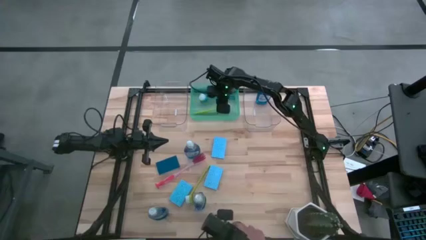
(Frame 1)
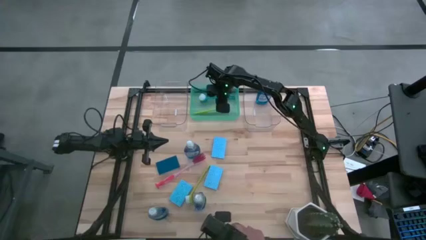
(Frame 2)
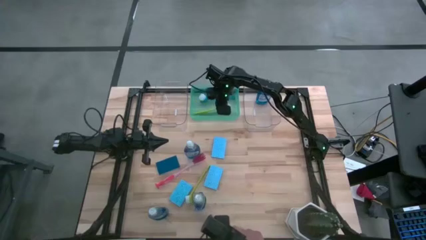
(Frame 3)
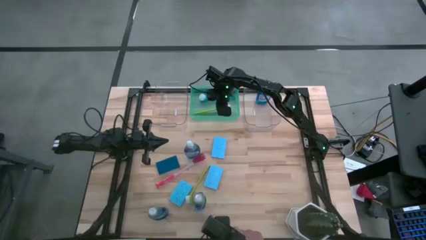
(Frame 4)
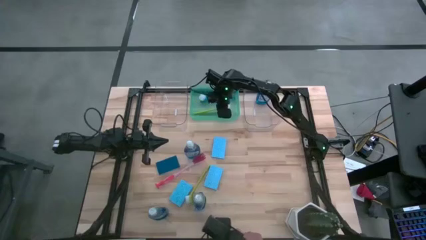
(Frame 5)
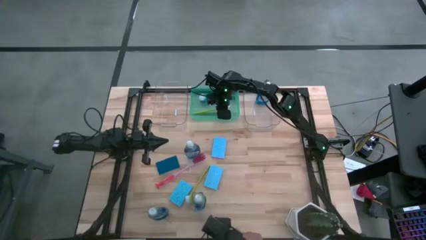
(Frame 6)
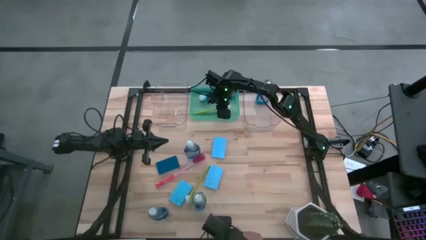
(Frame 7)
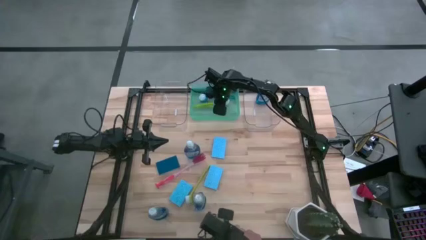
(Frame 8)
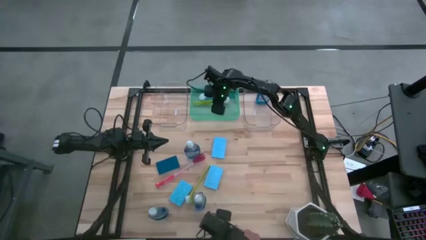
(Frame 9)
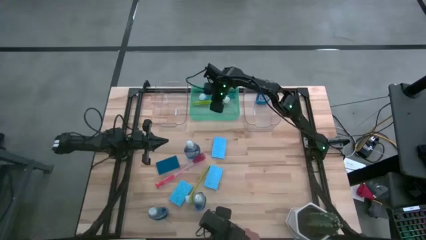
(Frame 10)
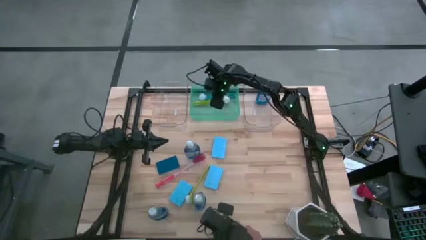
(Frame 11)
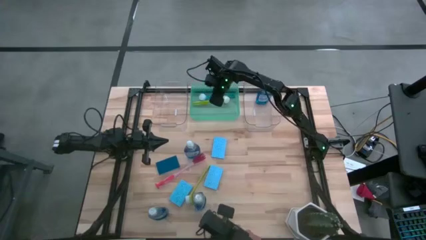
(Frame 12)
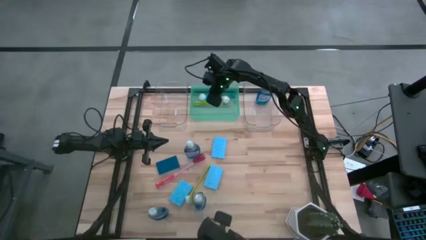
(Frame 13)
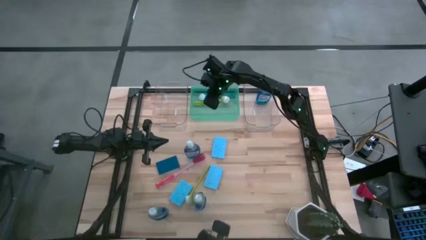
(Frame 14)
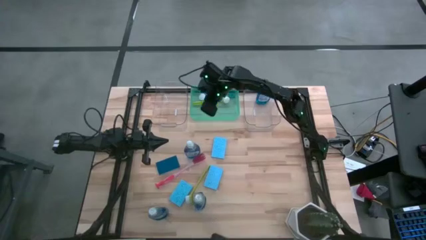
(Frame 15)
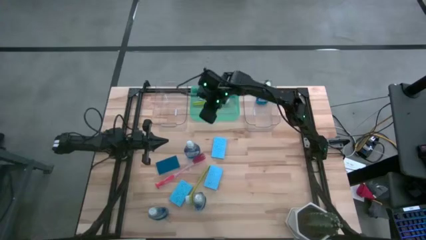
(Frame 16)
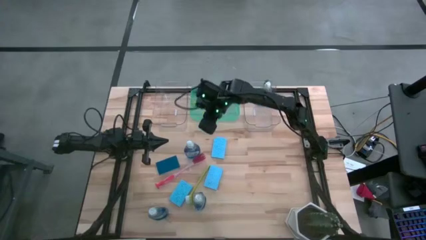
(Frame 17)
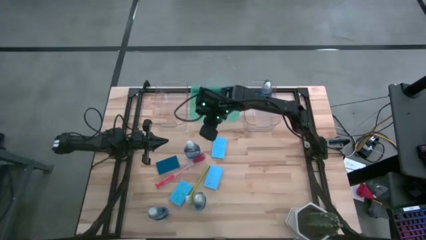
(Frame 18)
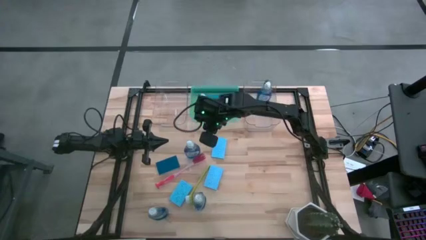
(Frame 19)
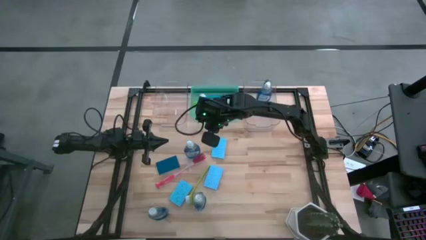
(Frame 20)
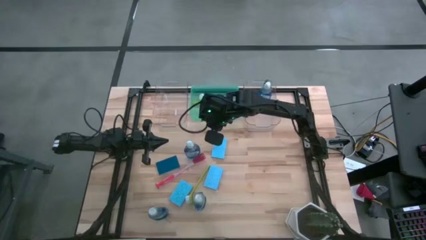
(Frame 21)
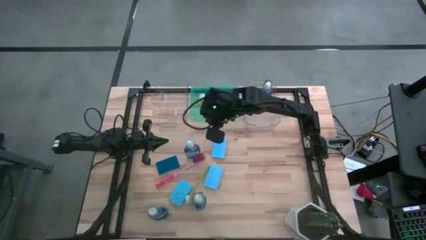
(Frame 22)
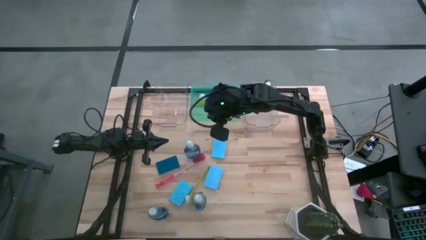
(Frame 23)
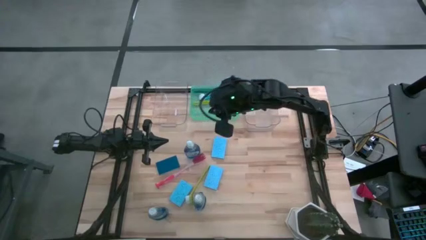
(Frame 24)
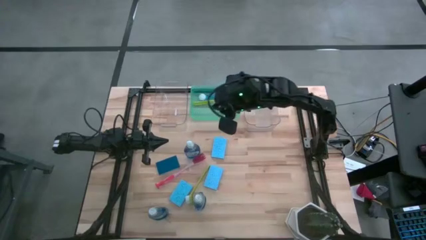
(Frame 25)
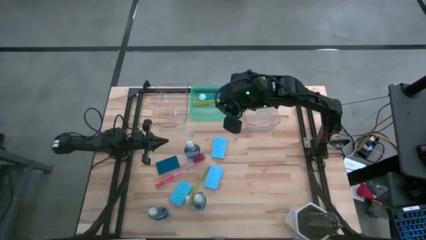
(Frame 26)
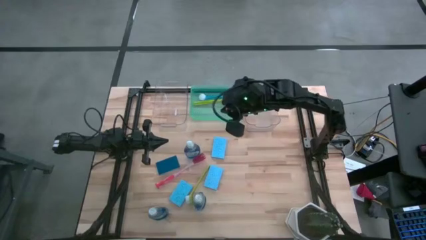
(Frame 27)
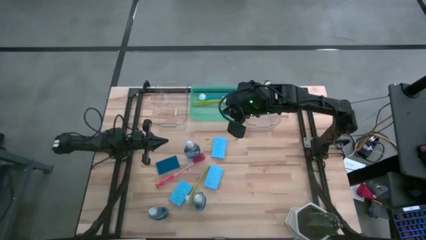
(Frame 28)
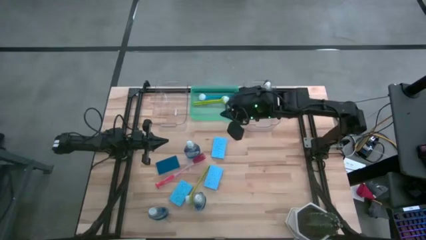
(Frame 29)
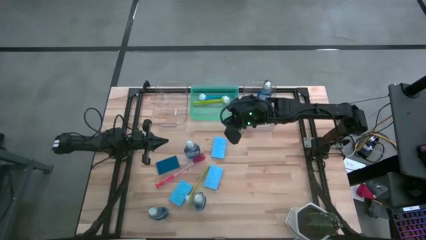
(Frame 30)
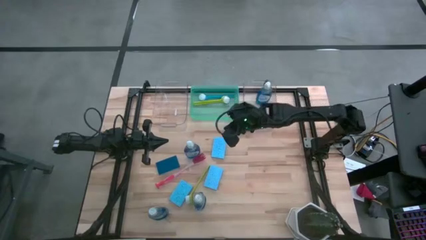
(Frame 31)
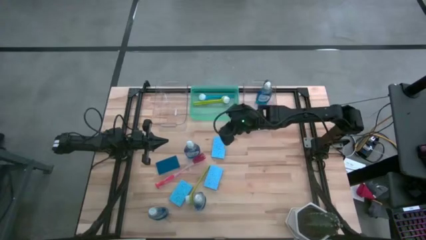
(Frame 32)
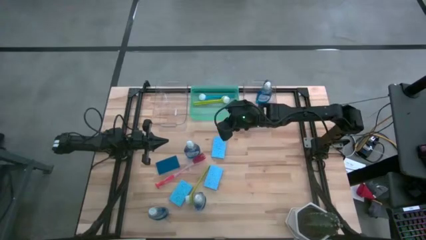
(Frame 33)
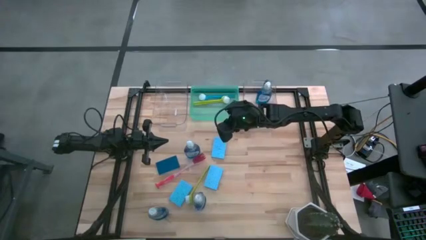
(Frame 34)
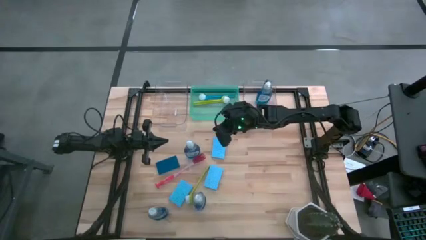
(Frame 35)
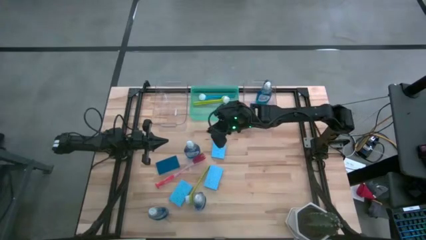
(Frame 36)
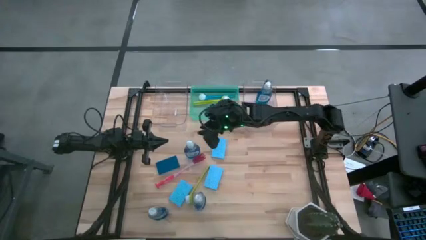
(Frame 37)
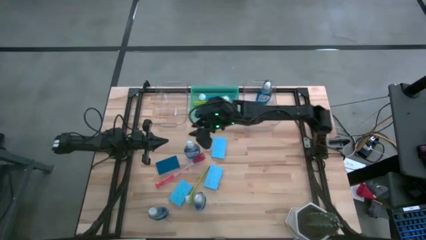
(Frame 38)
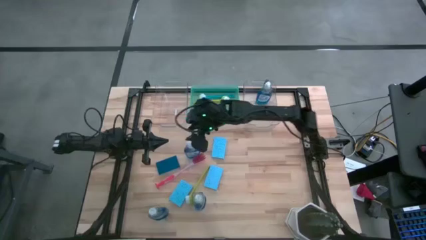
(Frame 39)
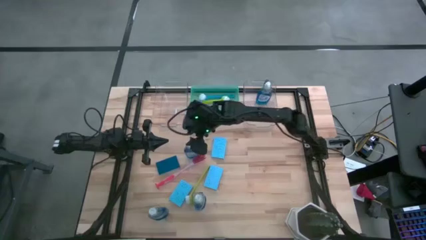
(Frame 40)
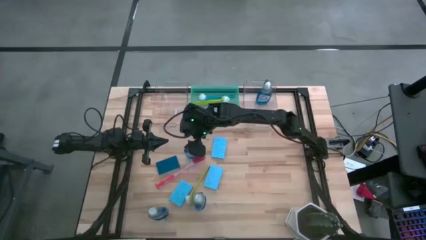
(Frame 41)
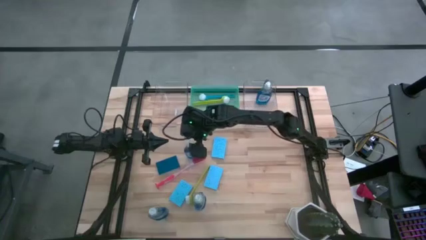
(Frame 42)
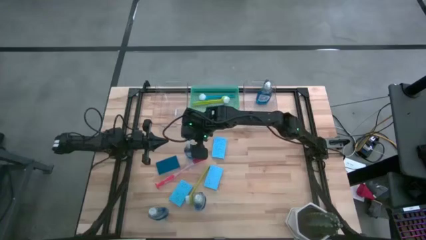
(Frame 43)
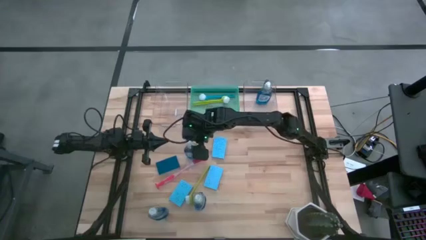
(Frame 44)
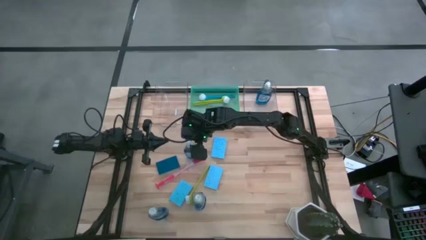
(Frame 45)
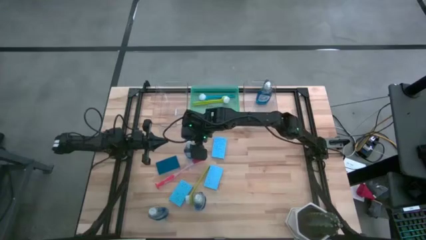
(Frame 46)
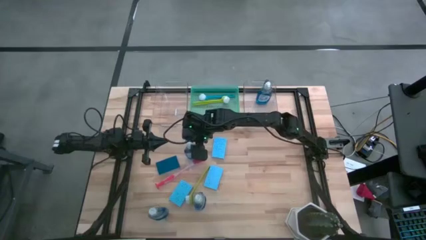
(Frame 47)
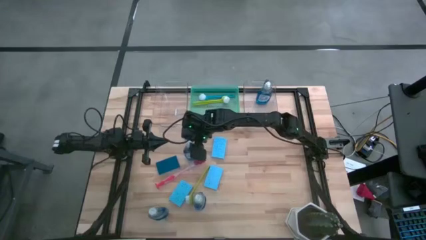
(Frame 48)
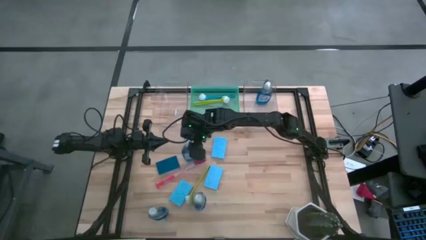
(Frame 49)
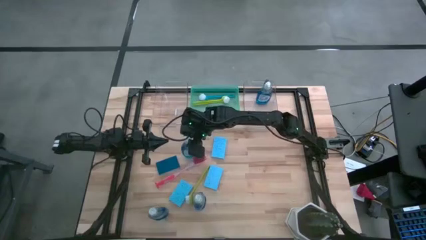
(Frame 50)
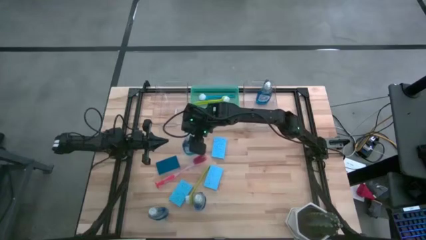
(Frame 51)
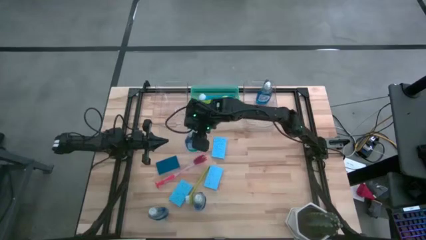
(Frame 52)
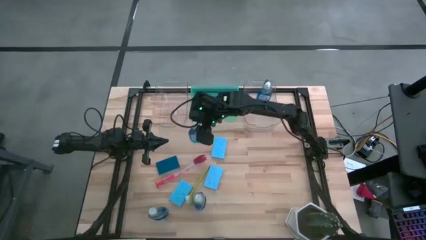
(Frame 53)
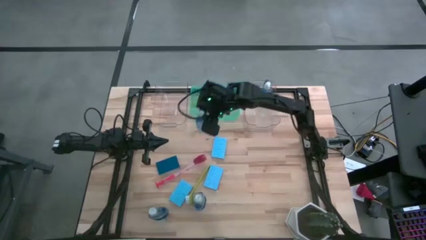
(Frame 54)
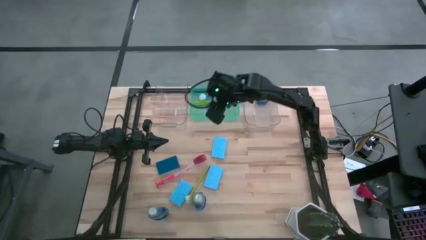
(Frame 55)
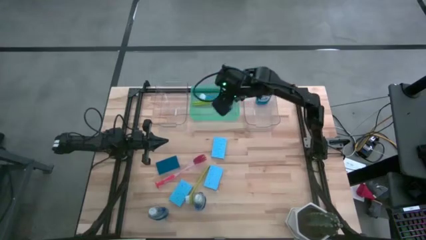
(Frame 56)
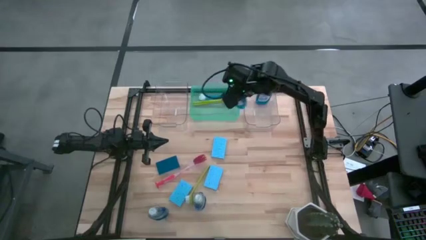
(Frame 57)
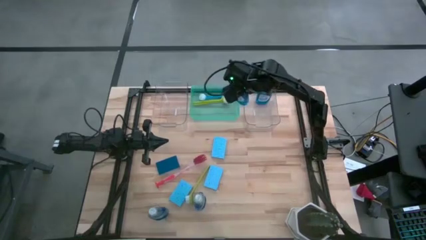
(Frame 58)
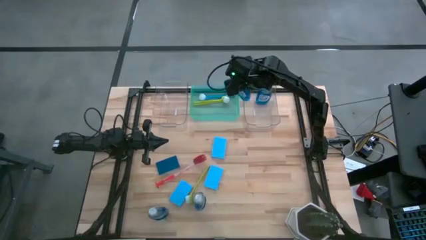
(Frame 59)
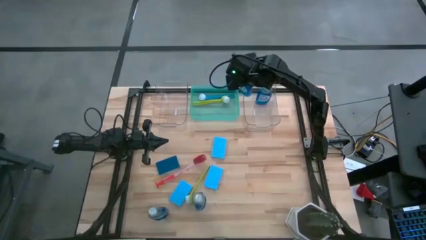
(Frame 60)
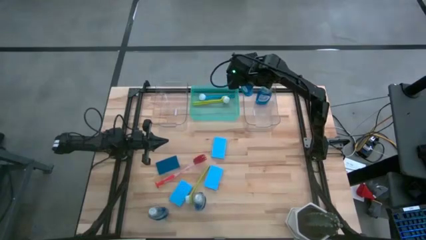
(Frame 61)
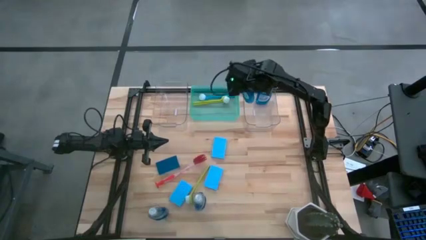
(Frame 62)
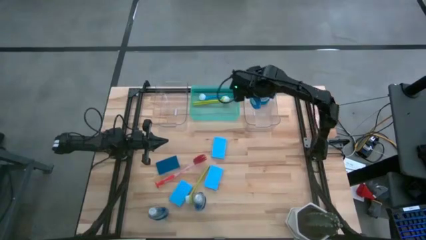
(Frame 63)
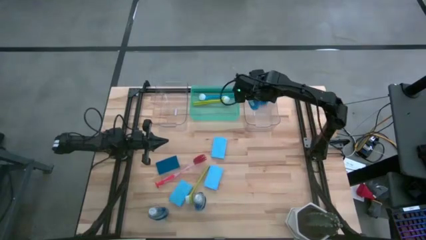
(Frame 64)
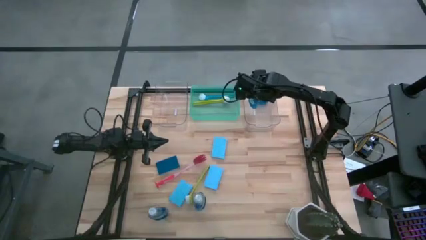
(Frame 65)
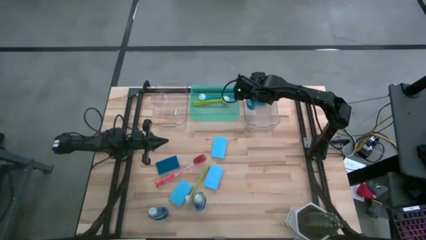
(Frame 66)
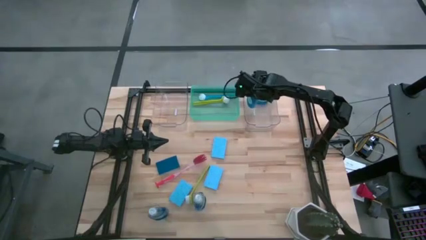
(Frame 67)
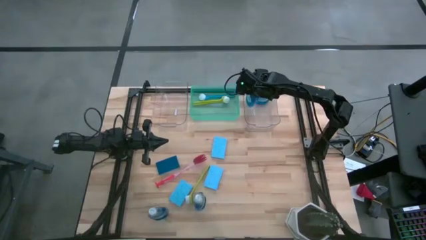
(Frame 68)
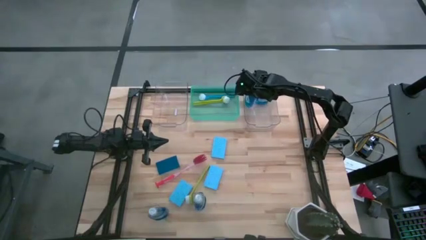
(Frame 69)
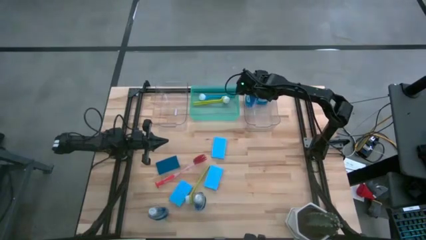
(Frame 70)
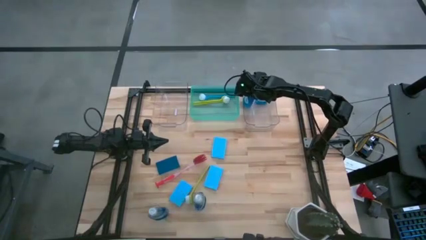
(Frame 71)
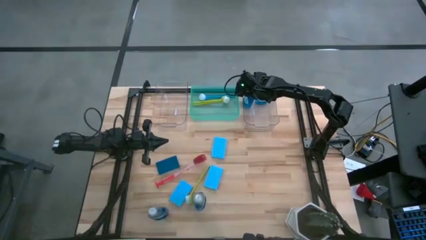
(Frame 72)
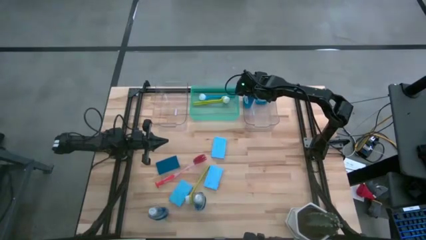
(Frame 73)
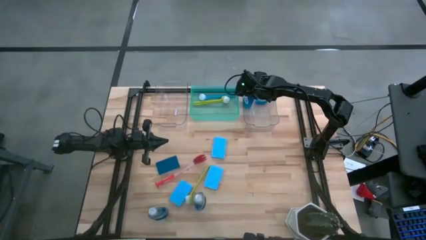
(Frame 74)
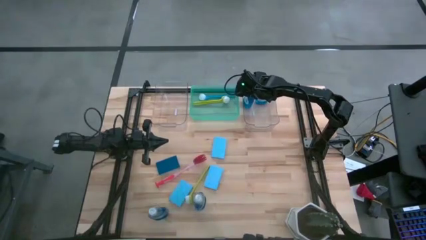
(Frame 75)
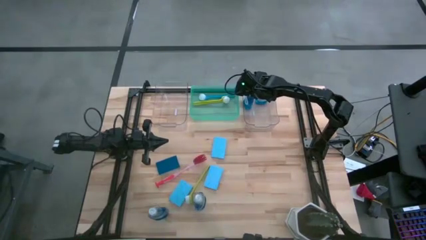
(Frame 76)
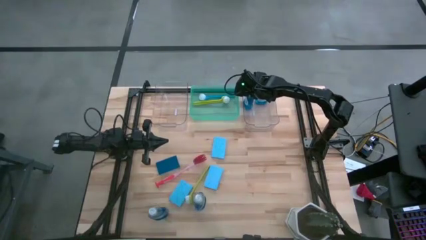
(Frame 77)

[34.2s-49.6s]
Task: Pick & Place Kitchen Sink Supplies
Put the blue dishwashing liquid bottle into the right transparent bin

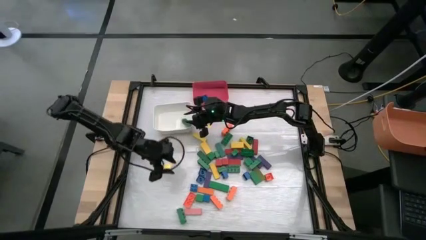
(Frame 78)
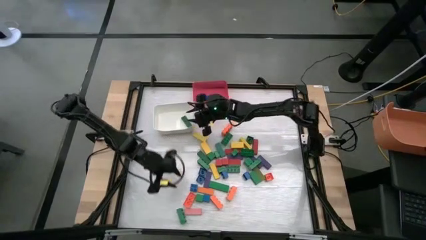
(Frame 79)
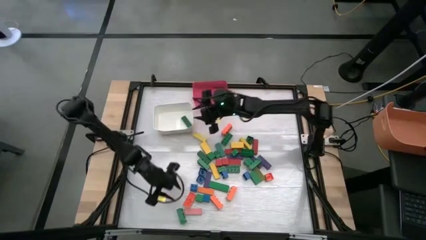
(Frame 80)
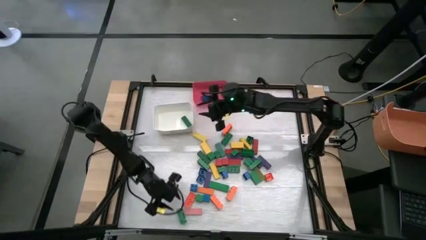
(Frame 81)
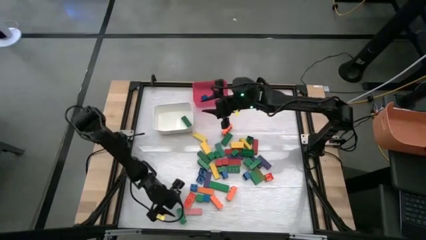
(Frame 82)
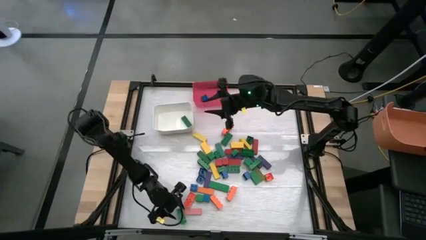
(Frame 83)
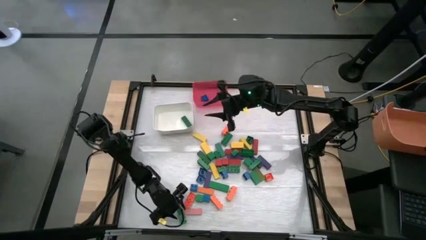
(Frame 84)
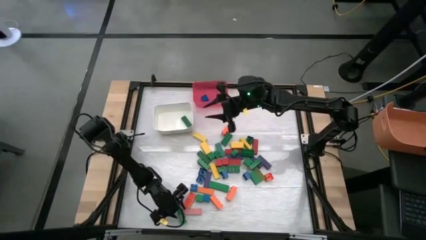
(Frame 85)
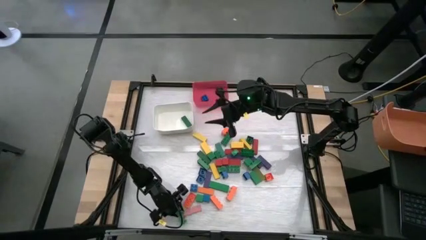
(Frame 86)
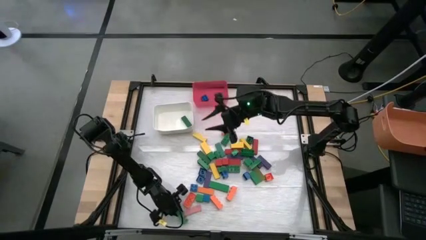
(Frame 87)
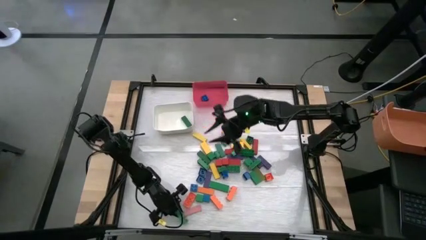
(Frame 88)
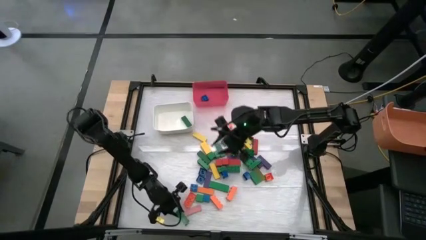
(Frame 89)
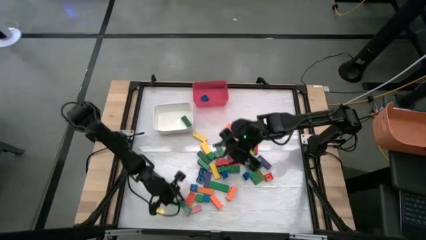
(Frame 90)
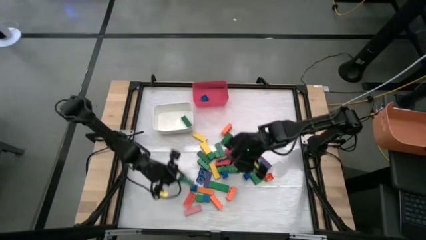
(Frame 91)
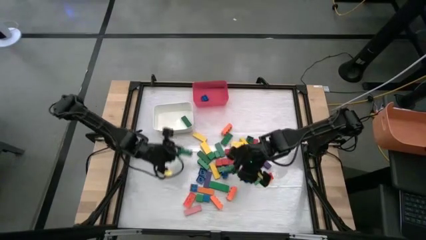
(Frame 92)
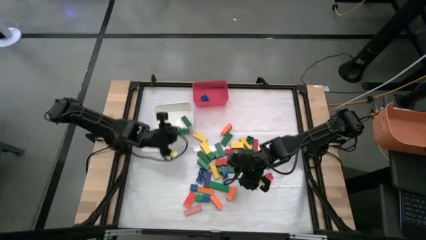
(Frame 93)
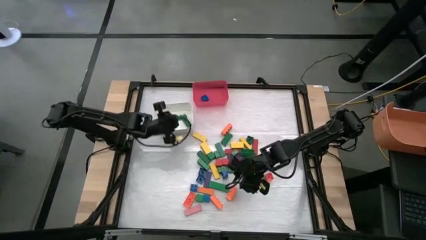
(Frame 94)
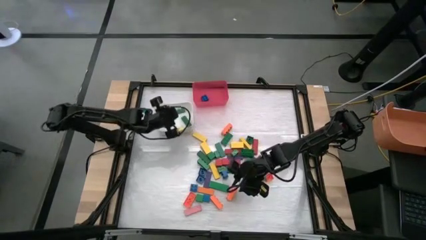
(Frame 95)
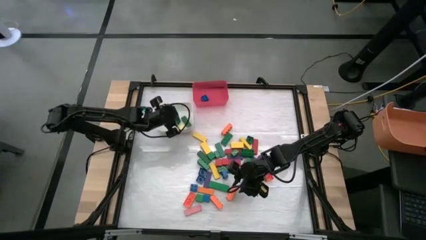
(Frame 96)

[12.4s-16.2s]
Task: Sort blocks by size
Put the large green game piece into the white bin
